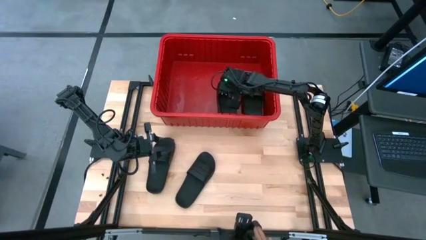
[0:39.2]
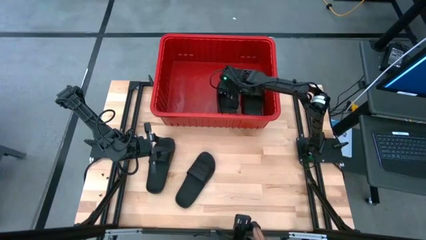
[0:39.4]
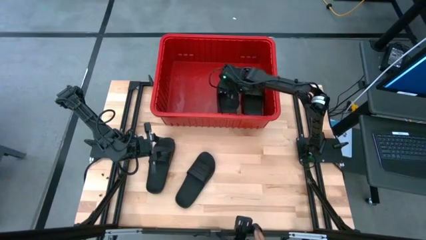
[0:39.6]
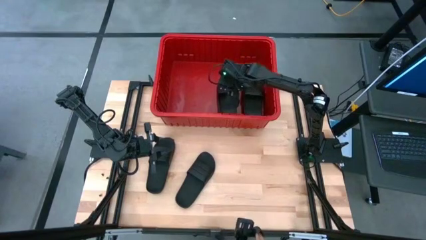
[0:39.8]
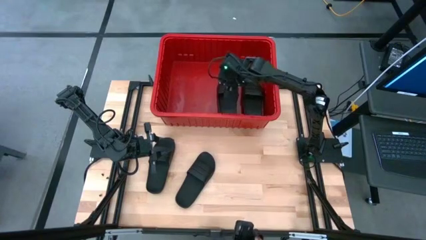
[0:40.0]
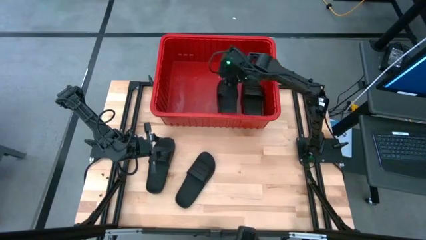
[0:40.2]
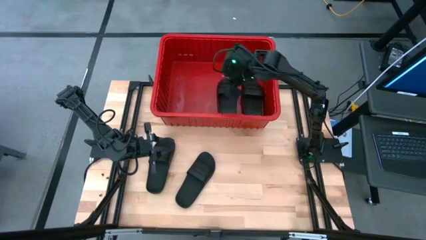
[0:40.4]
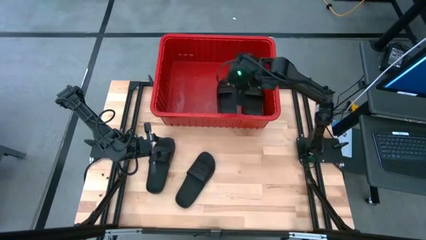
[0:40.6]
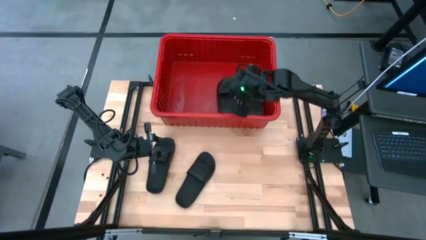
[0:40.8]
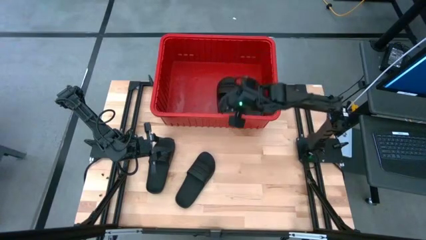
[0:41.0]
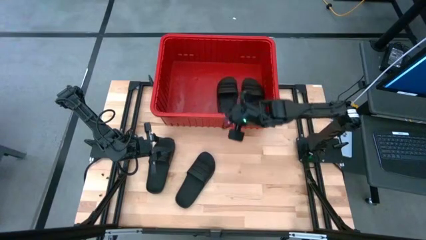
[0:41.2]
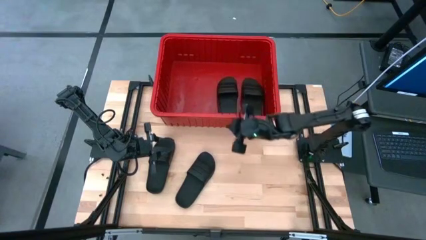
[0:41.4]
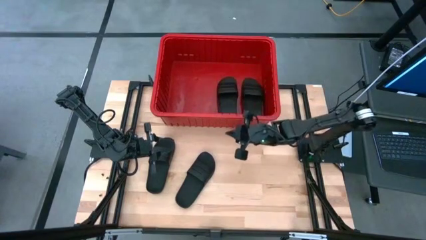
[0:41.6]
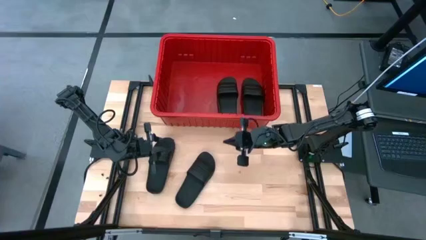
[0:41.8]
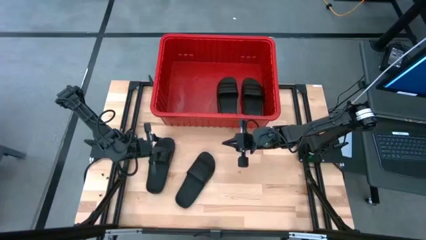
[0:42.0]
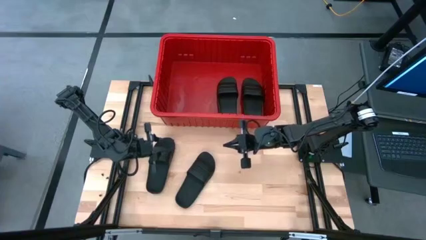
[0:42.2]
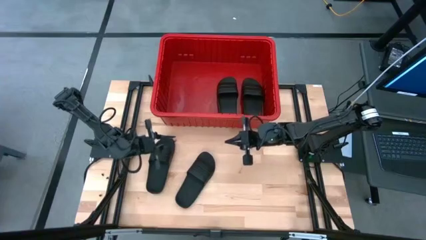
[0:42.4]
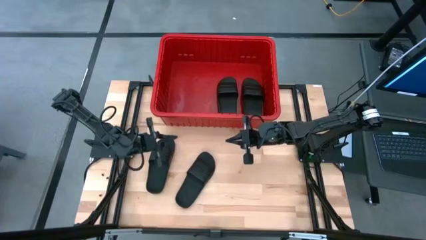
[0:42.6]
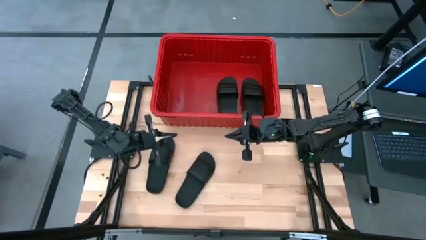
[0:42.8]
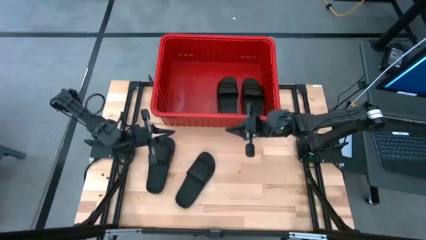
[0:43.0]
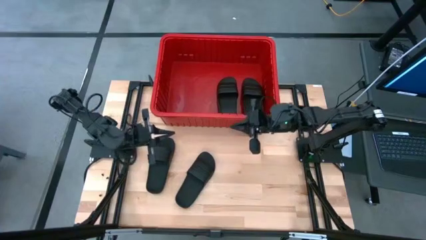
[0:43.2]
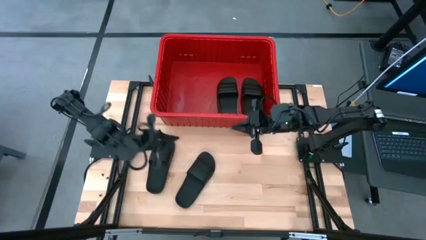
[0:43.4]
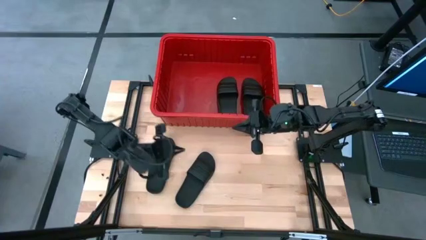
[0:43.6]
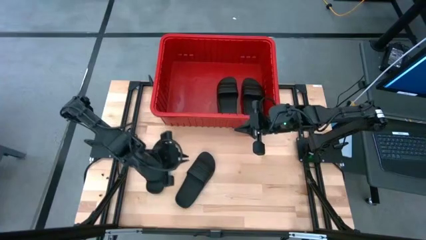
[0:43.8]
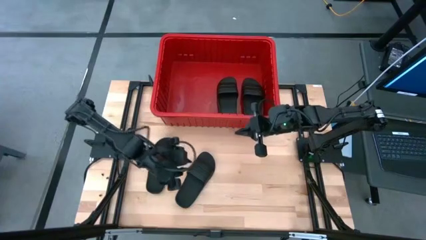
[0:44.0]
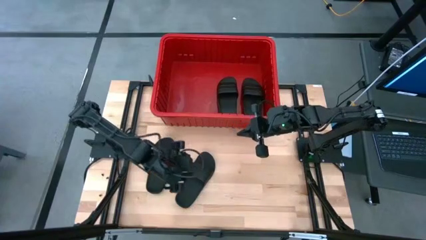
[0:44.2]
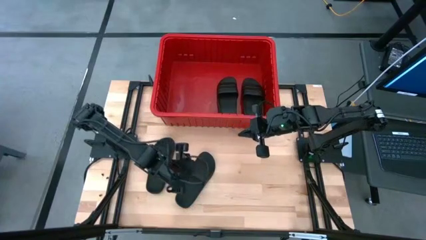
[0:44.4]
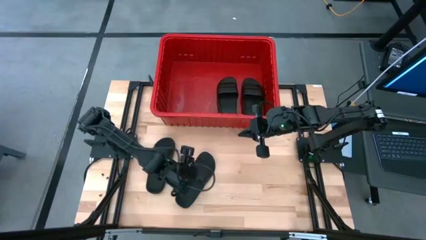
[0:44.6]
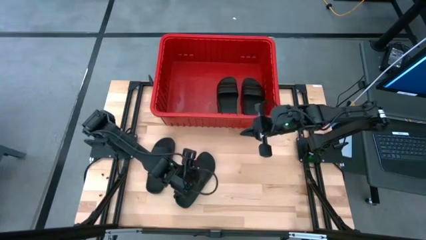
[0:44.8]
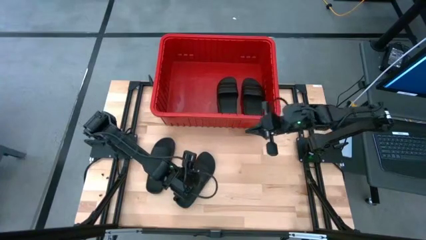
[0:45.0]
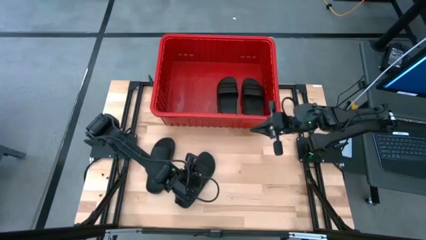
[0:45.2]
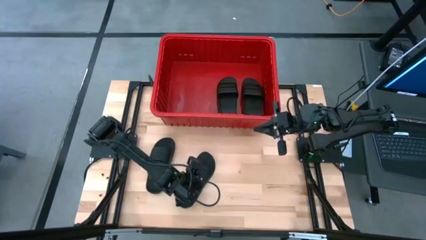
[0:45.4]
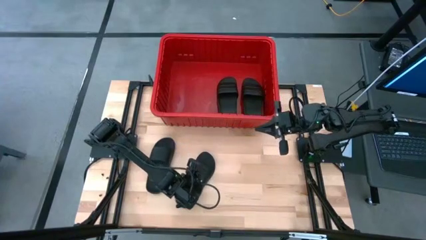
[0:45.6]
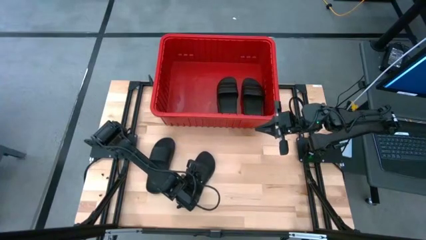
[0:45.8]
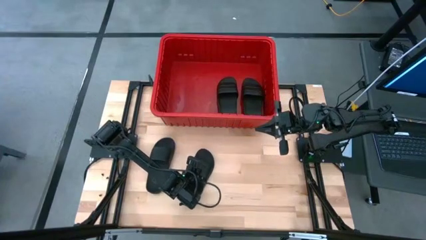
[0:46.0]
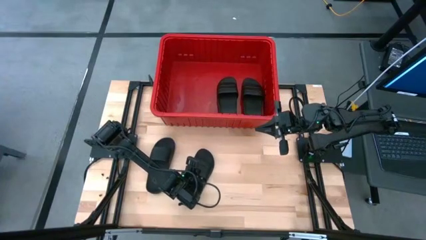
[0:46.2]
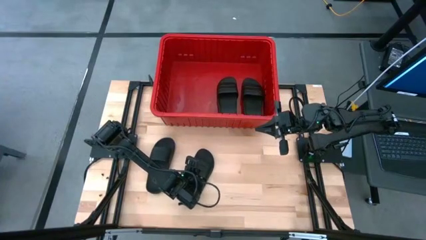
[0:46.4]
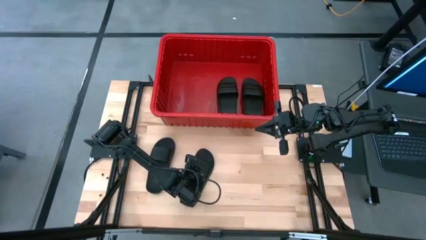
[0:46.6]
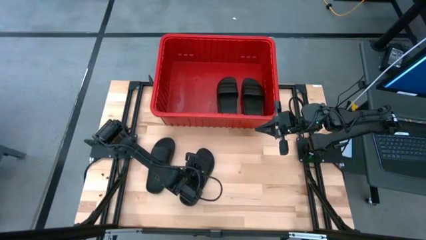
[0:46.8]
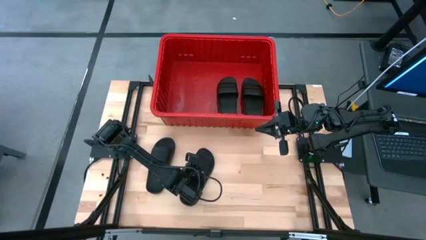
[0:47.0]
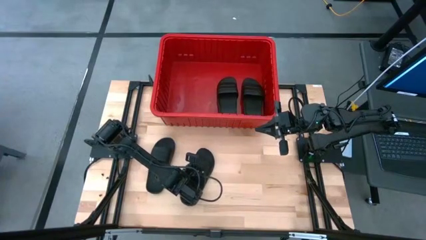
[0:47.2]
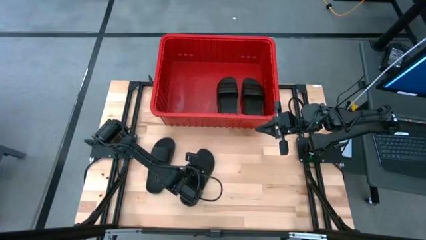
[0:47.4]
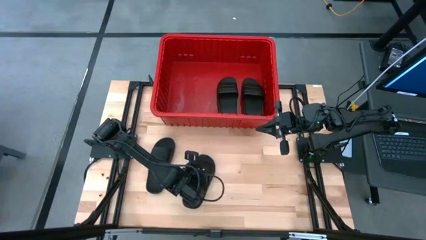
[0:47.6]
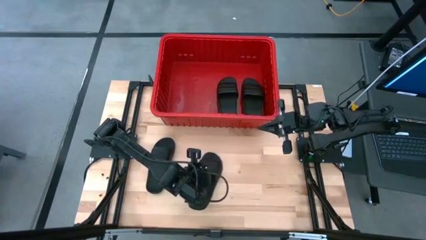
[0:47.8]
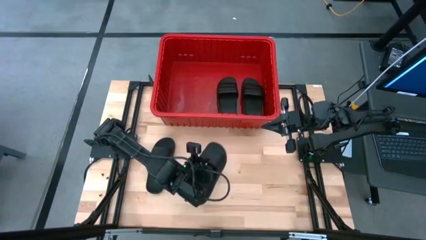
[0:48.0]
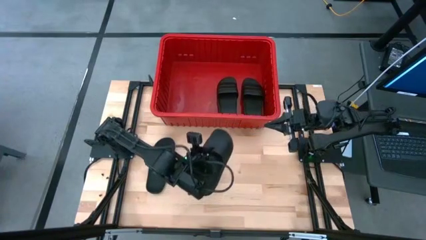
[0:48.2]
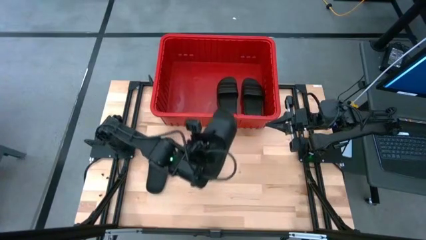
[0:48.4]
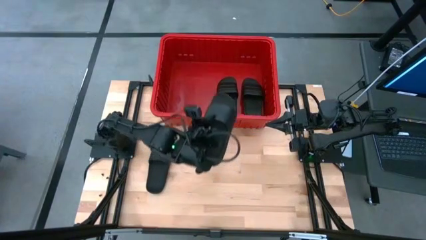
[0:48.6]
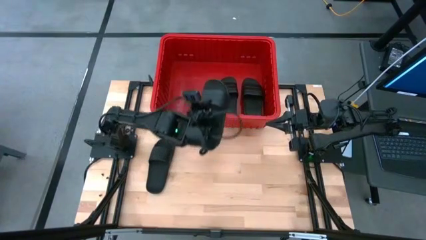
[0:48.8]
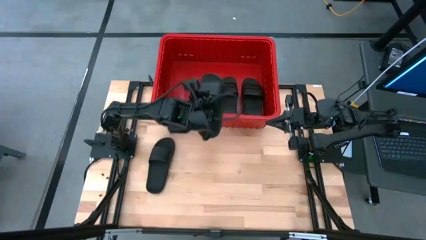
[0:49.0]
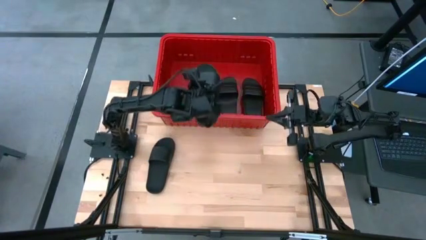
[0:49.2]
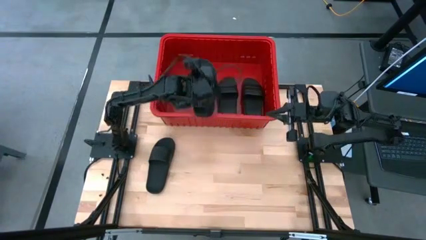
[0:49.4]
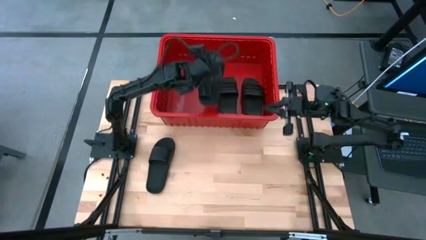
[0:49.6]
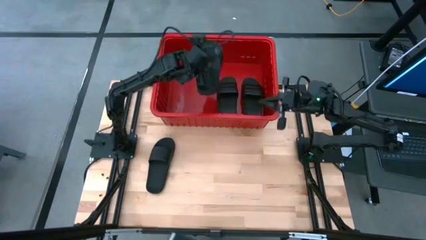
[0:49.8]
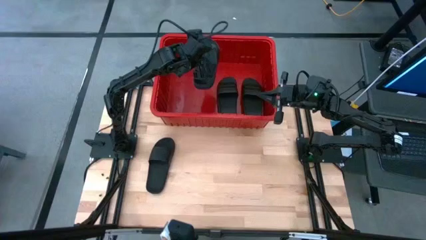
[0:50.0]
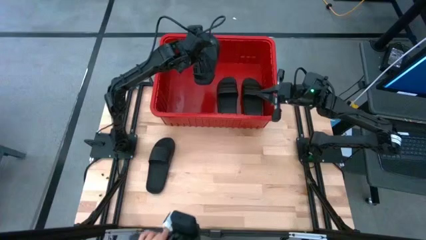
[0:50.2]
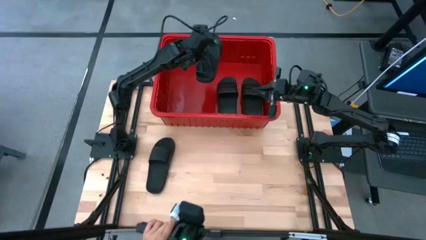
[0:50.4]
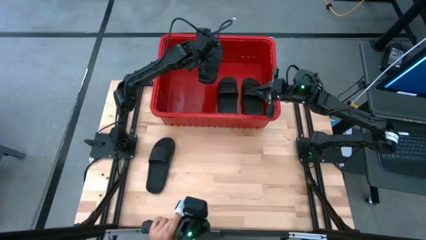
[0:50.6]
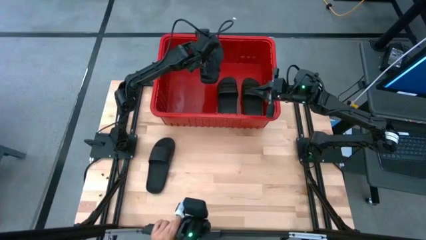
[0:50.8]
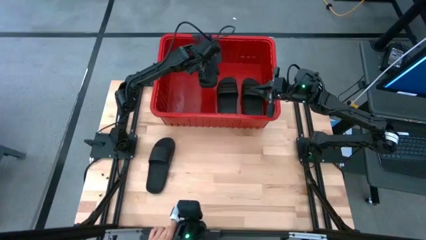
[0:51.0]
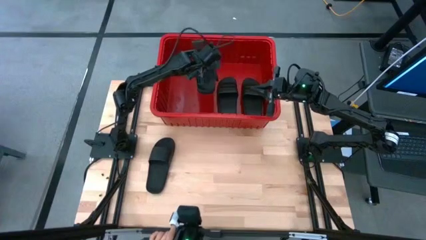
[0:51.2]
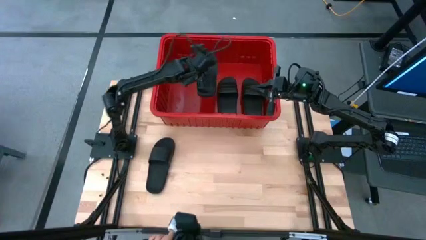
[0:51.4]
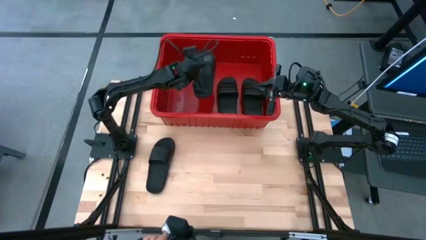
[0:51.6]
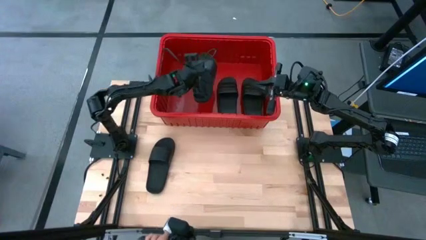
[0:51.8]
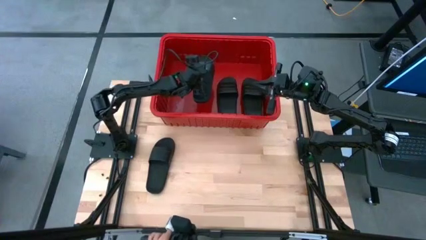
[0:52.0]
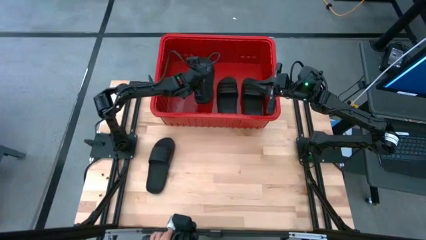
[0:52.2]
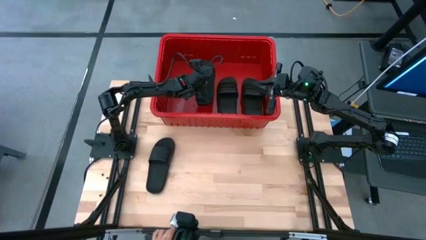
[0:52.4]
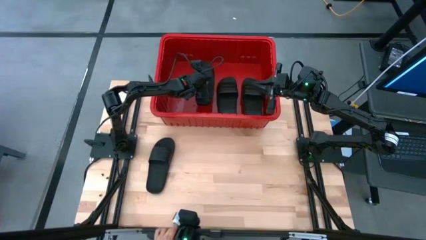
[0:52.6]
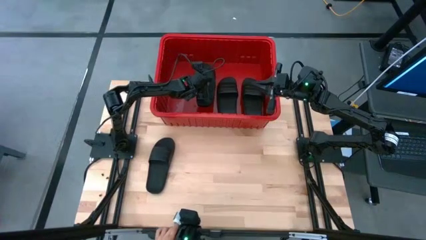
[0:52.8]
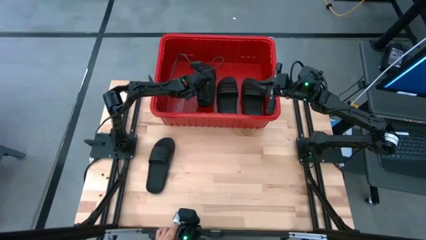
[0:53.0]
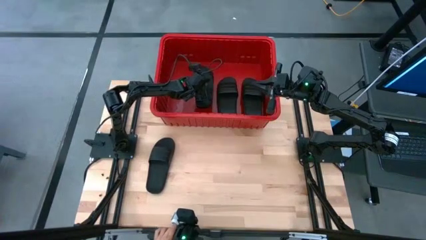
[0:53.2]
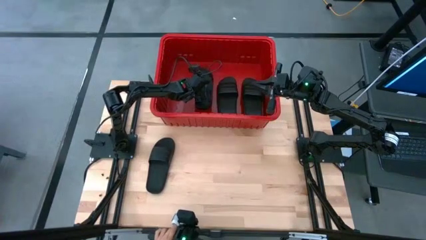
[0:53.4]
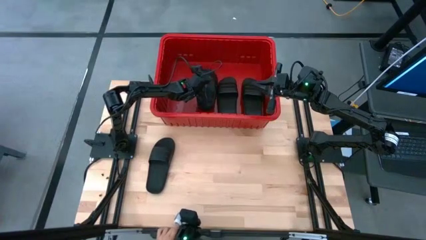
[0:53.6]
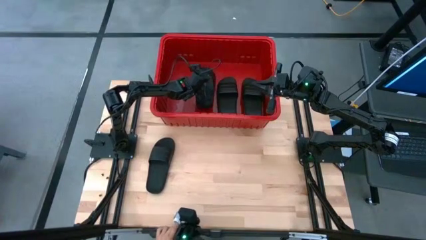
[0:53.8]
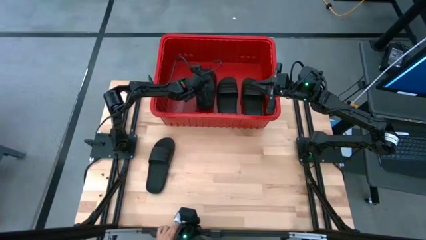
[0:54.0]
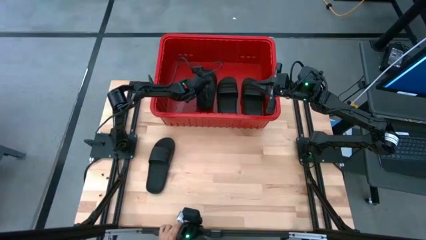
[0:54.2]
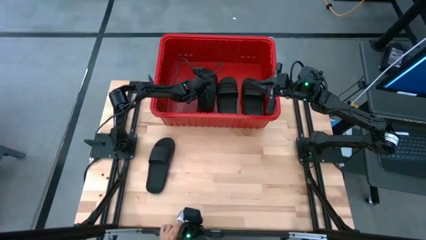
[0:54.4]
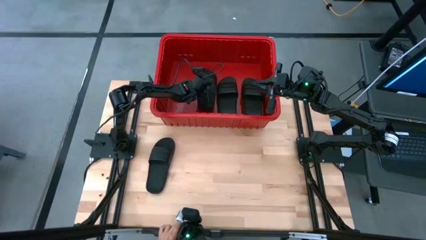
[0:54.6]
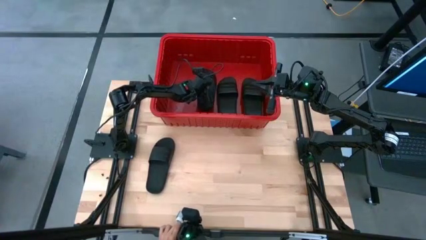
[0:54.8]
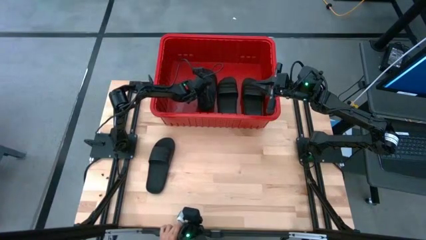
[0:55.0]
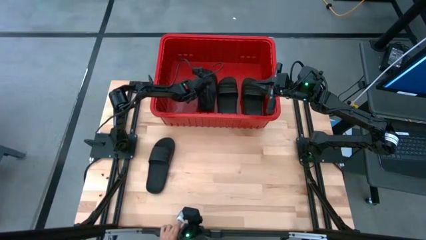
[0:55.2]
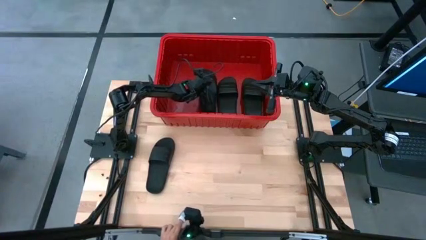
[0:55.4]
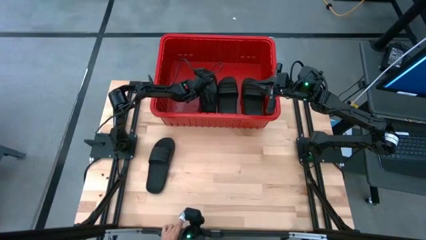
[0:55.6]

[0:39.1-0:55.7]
Task: Pick and place slides into bin
Put the right black slide into the red bin
